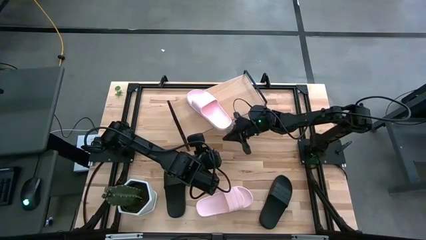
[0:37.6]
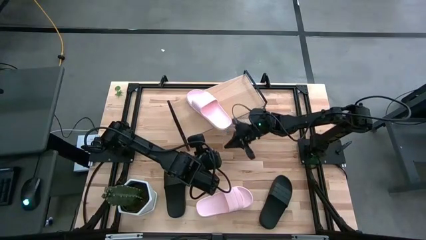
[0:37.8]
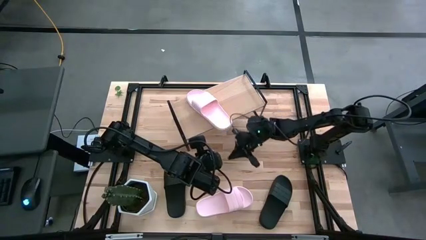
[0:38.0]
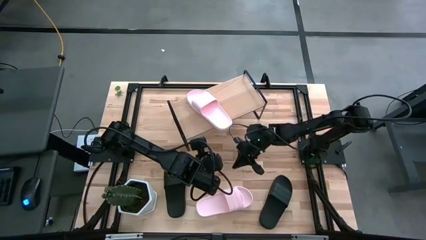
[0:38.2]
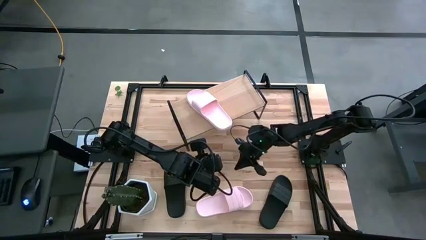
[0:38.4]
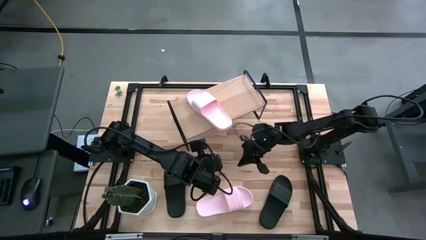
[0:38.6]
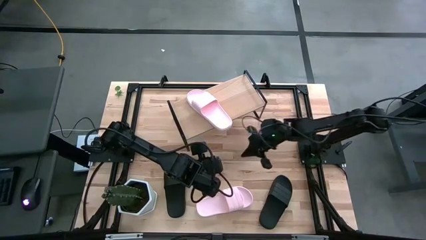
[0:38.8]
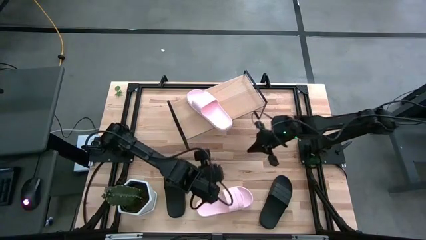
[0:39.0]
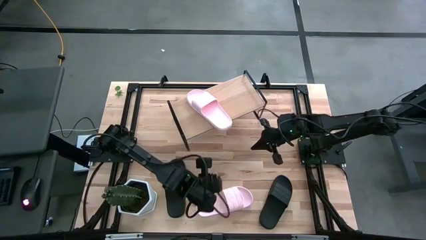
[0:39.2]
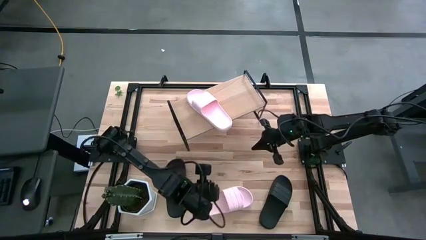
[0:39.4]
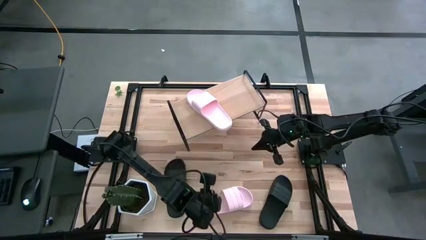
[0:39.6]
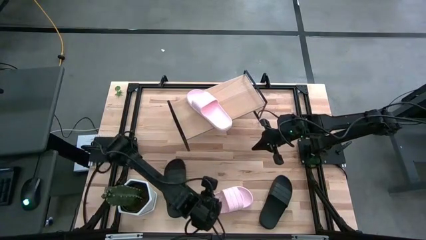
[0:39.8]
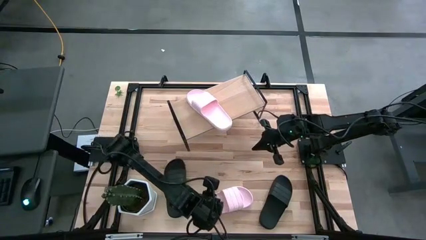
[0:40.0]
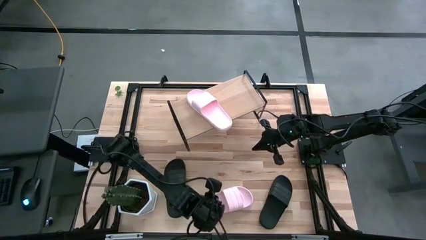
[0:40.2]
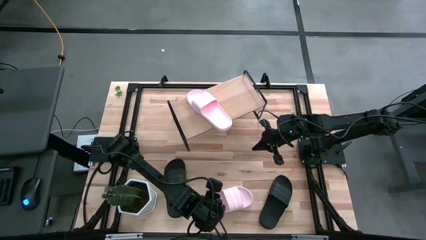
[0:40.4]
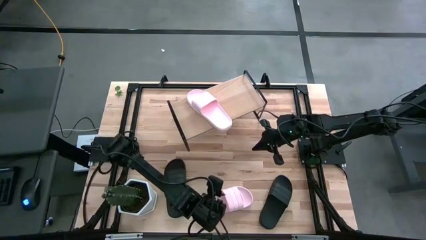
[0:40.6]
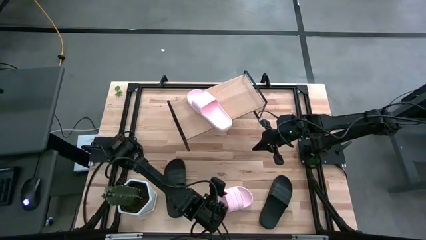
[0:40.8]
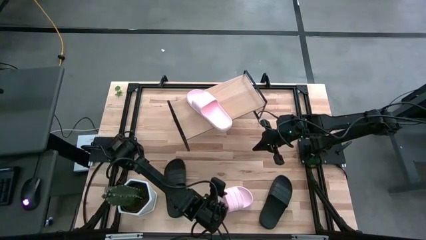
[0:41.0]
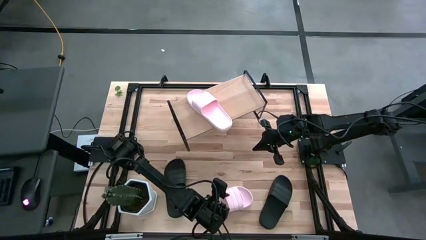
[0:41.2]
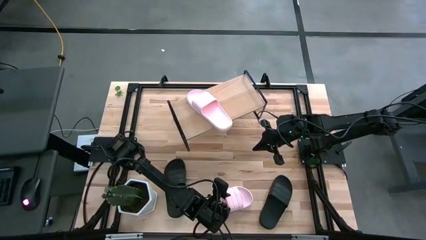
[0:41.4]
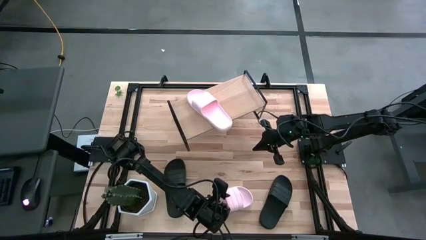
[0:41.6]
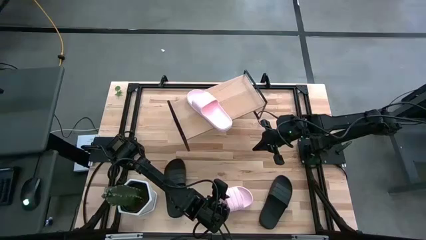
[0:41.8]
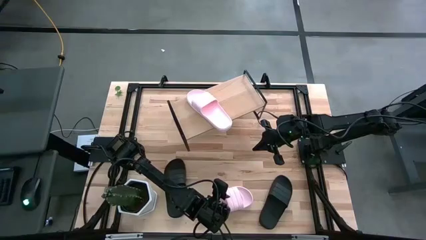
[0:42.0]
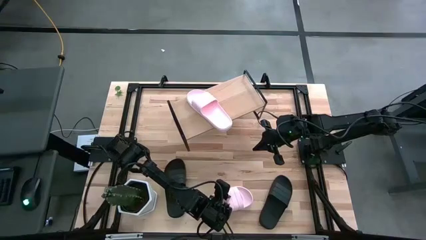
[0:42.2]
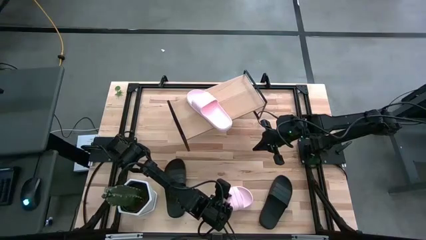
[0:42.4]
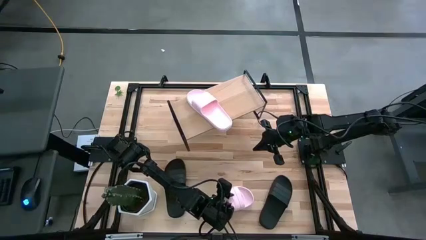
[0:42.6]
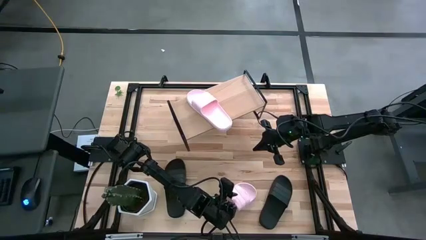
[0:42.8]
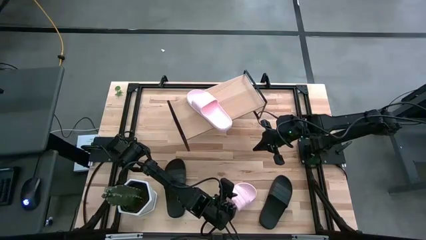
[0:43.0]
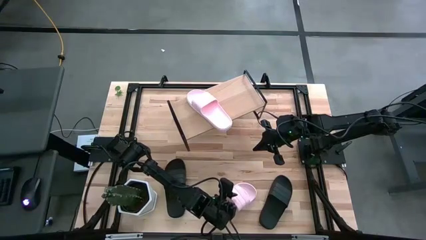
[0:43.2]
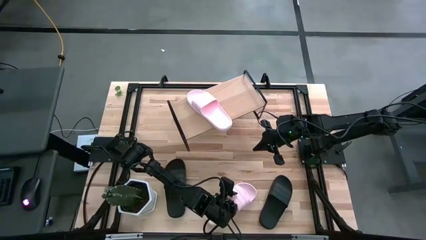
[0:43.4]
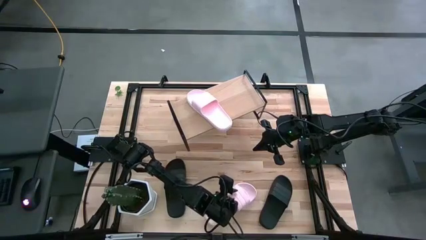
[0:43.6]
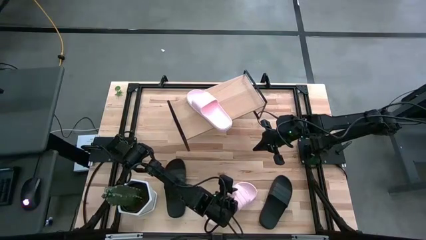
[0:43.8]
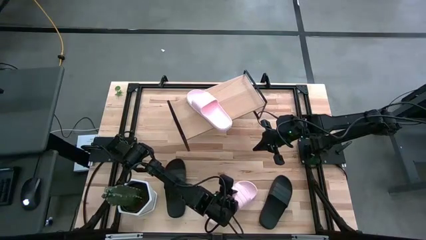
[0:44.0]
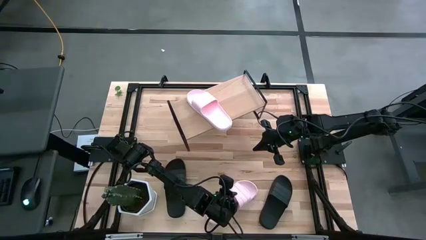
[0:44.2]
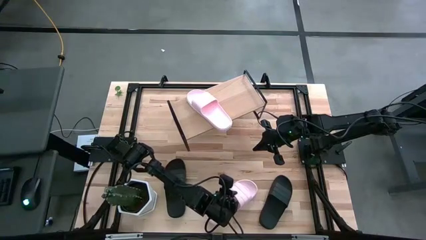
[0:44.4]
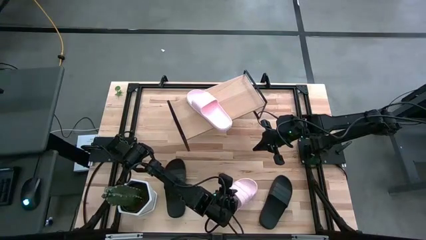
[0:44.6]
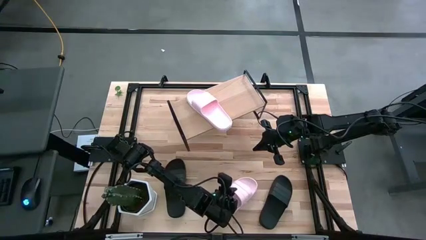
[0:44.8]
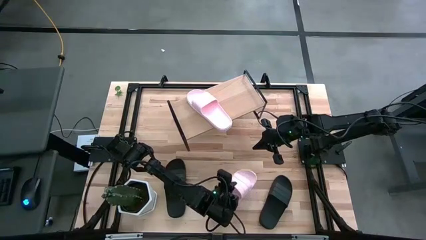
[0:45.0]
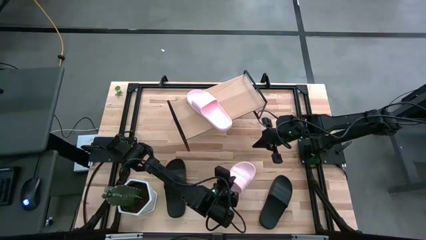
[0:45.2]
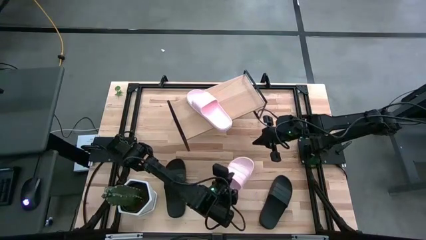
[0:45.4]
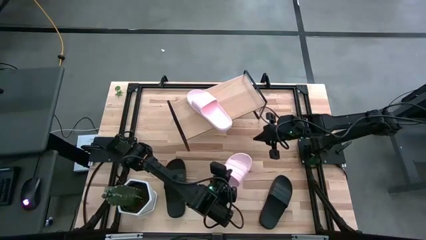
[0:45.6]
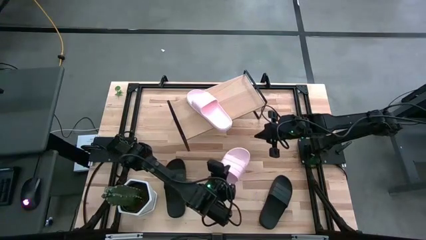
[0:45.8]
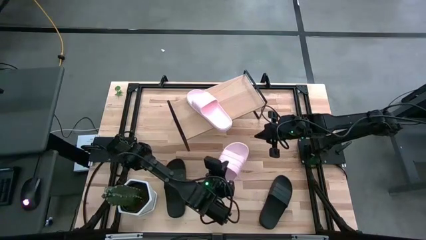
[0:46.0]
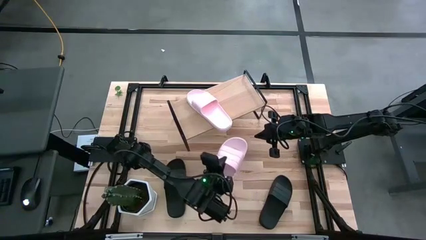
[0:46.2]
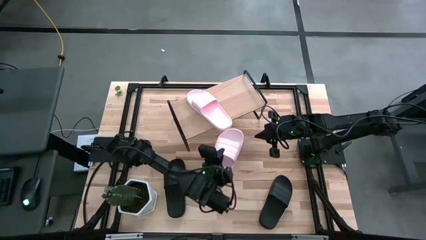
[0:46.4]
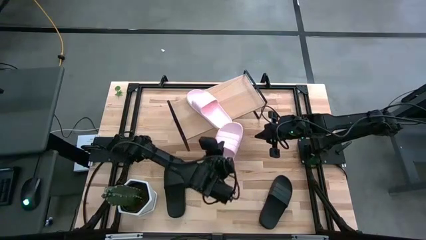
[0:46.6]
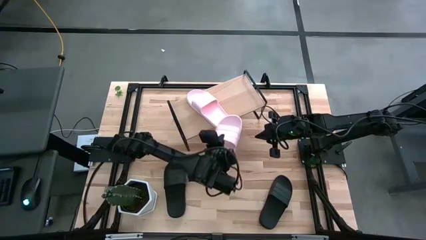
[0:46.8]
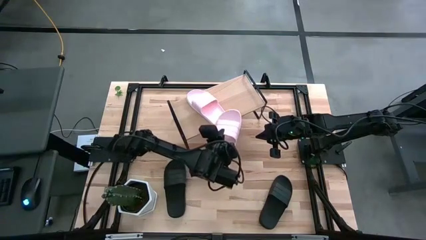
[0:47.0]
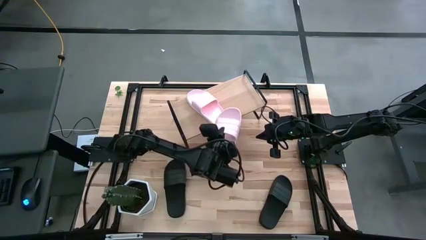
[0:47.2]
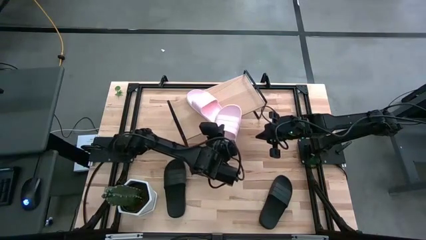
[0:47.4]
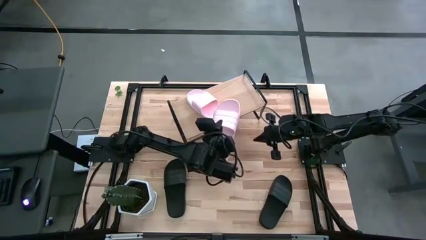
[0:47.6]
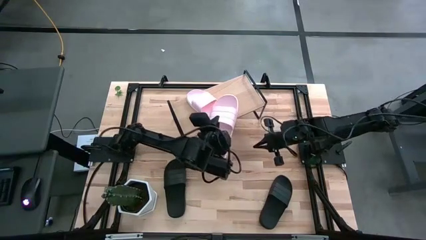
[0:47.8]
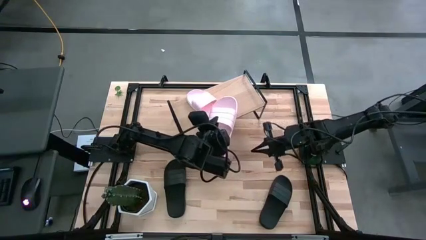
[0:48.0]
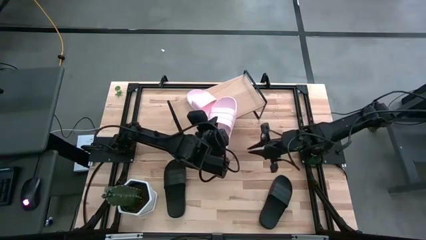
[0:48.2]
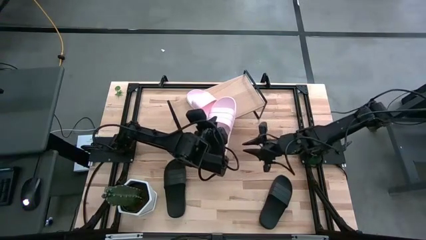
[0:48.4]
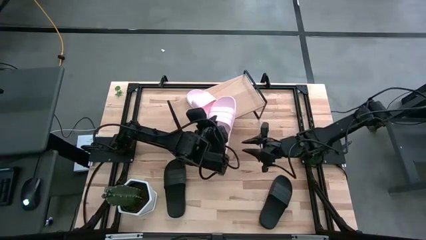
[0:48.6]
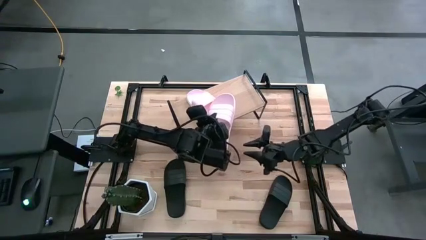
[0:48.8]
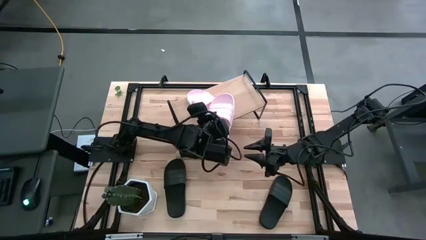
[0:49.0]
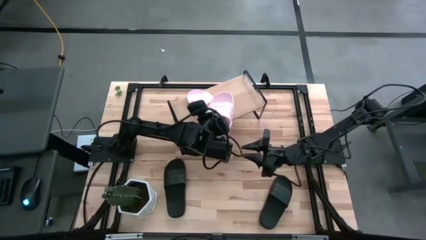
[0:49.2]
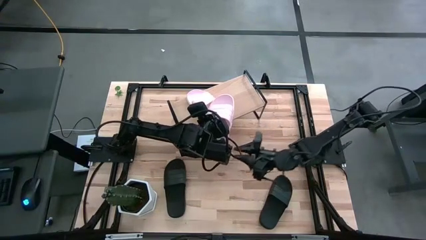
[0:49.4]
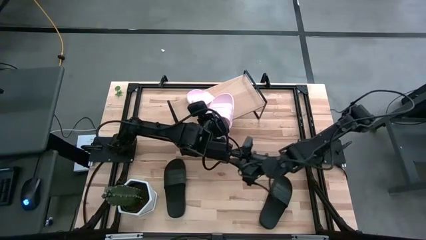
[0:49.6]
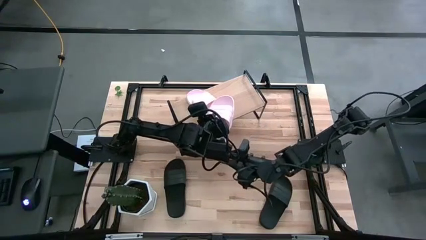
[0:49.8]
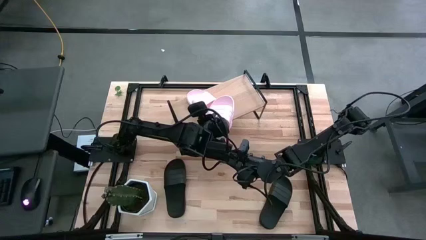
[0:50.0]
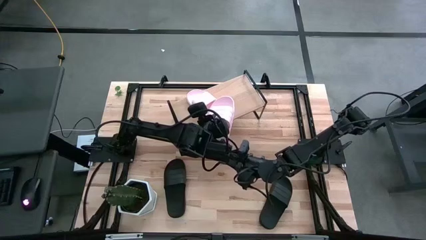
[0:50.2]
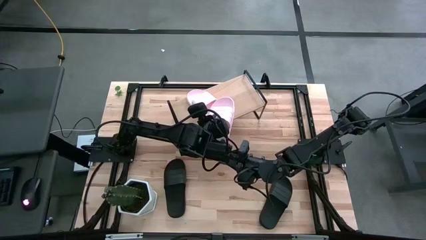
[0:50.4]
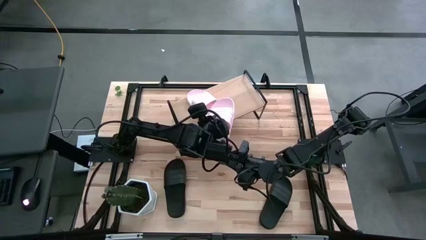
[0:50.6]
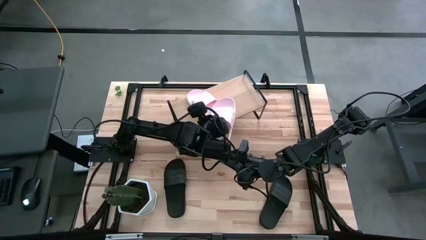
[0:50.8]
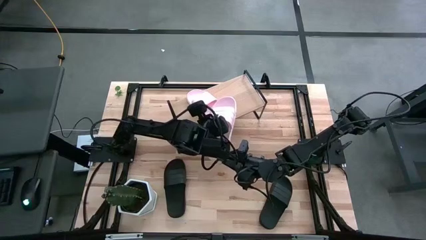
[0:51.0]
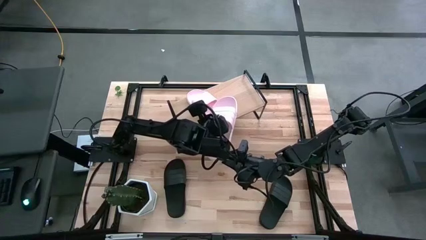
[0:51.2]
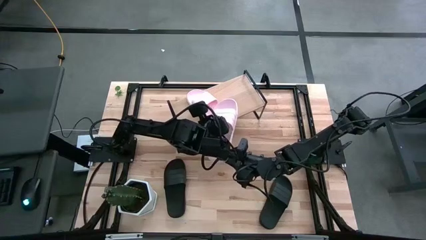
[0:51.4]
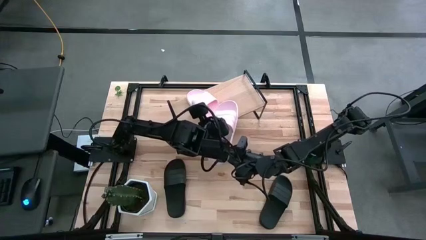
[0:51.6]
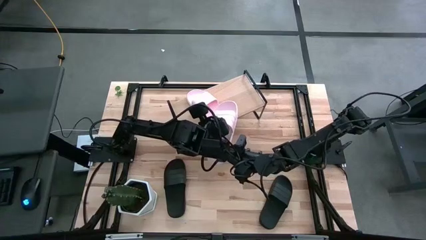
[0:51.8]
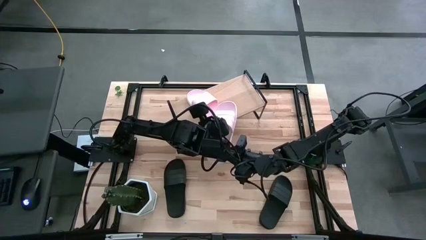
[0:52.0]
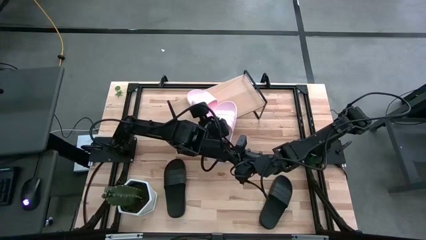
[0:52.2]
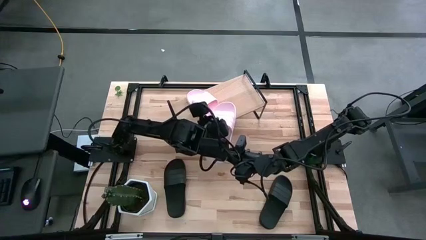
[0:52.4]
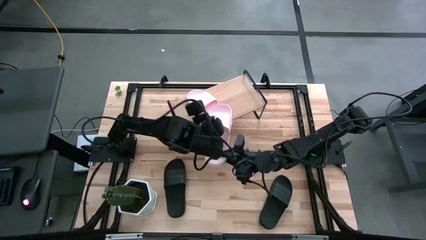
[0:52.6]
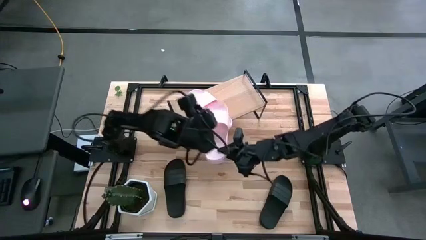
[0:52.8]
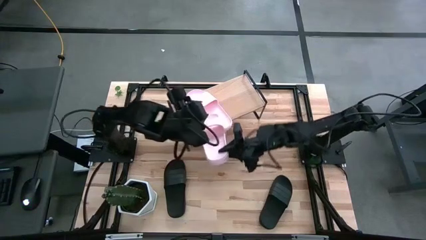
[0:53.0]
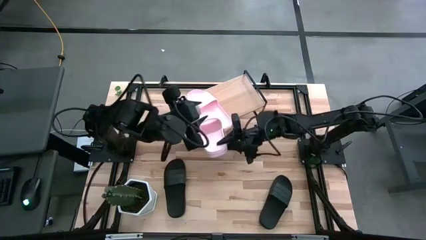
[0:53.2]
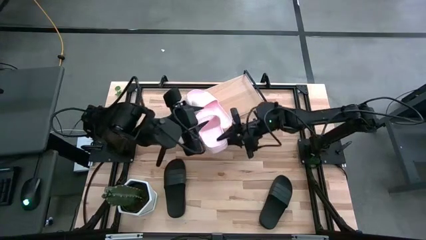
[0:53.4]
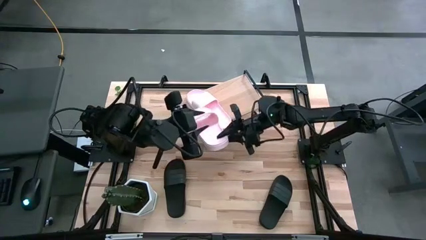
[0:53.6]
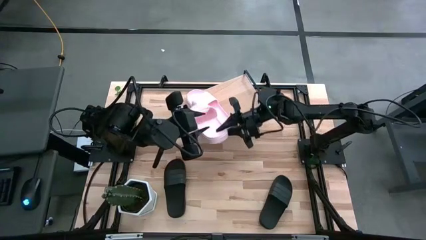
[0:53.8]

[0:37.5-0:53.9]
Task: Pick and place slides into the shelf
Put the pink slipper on the shelf
